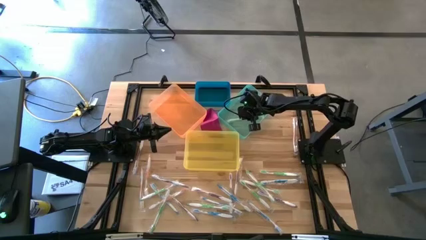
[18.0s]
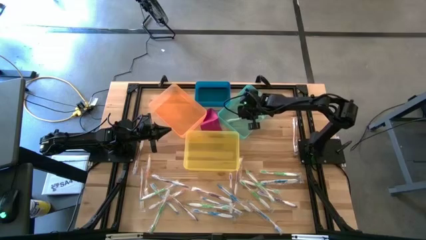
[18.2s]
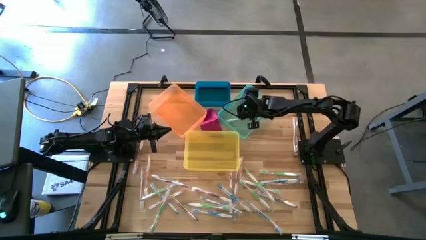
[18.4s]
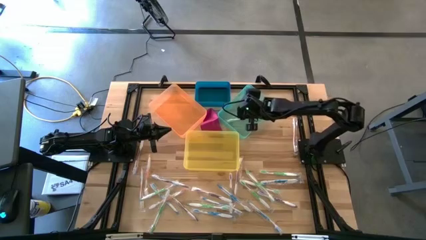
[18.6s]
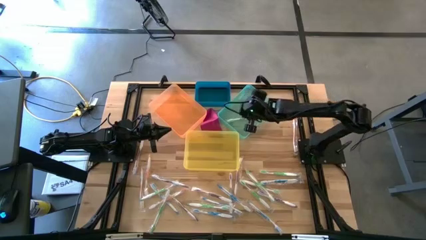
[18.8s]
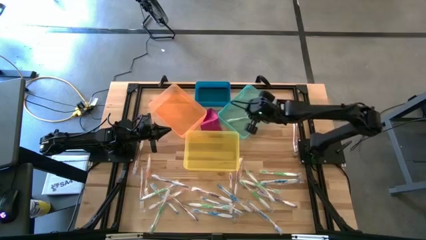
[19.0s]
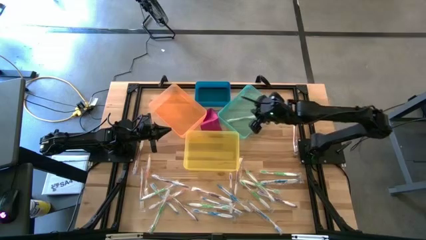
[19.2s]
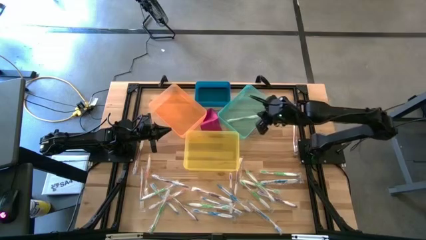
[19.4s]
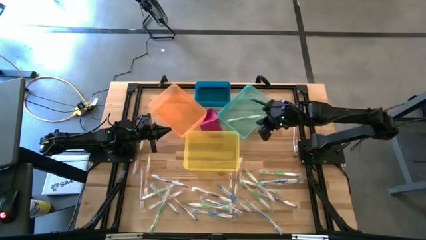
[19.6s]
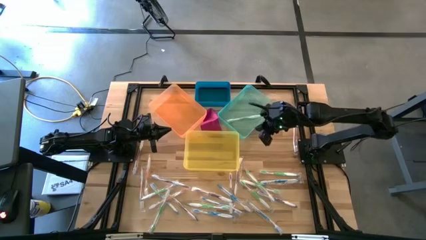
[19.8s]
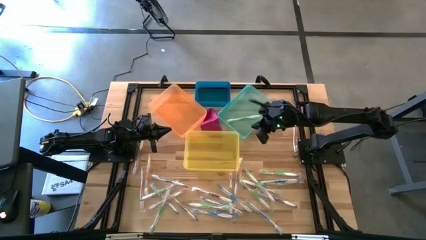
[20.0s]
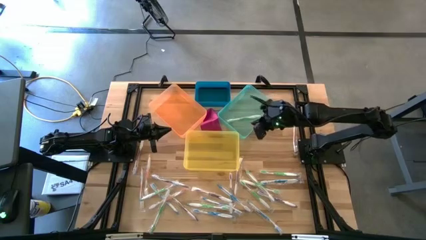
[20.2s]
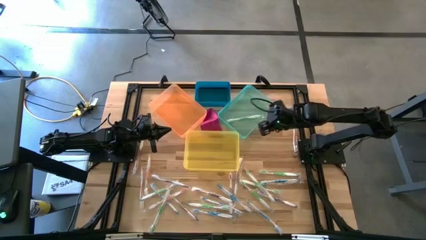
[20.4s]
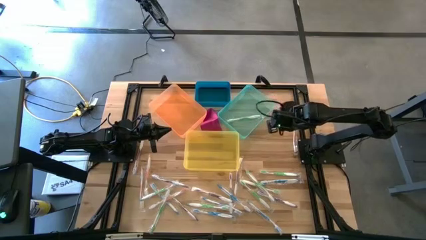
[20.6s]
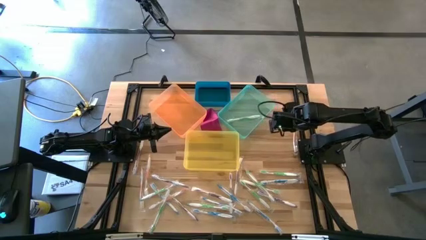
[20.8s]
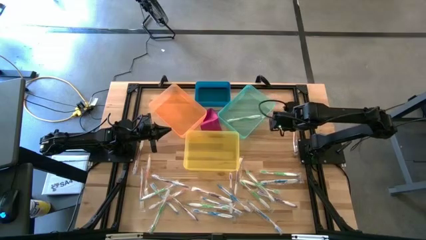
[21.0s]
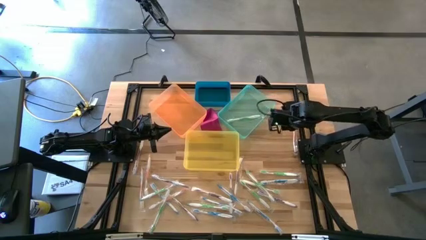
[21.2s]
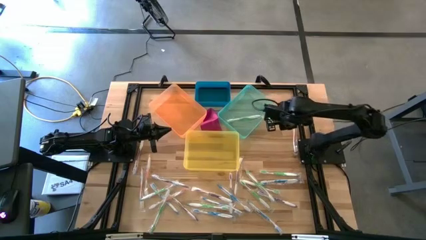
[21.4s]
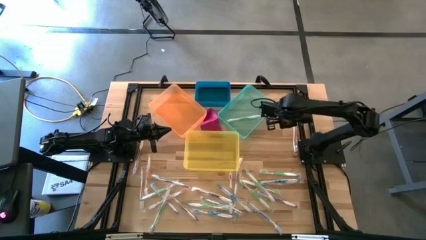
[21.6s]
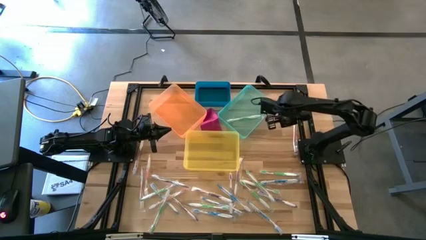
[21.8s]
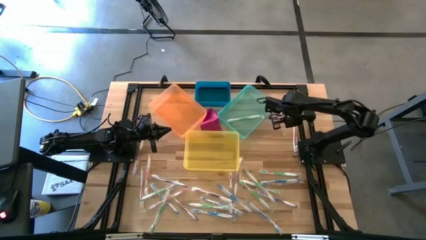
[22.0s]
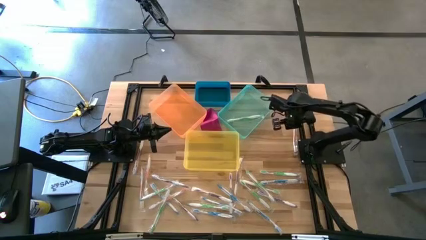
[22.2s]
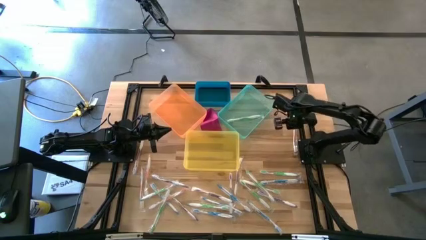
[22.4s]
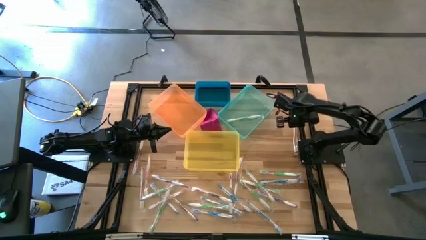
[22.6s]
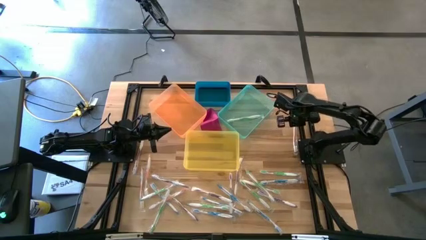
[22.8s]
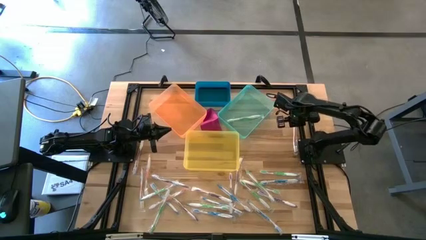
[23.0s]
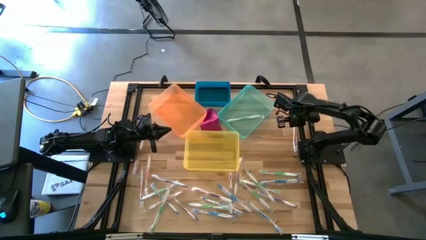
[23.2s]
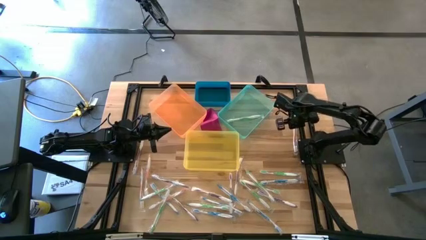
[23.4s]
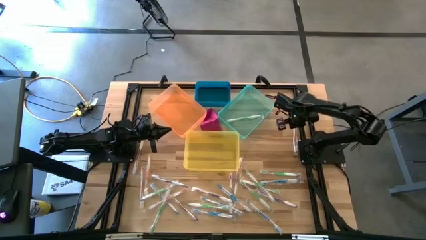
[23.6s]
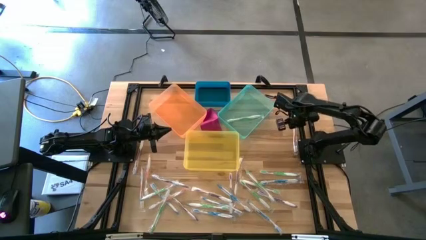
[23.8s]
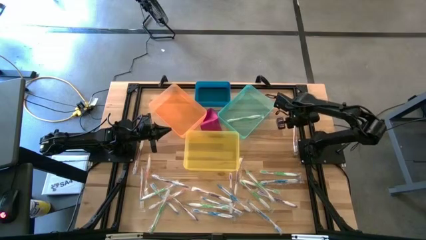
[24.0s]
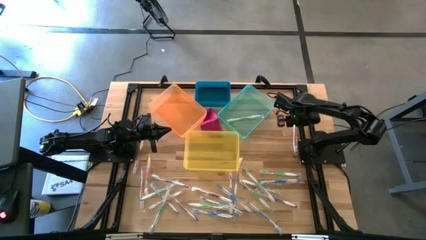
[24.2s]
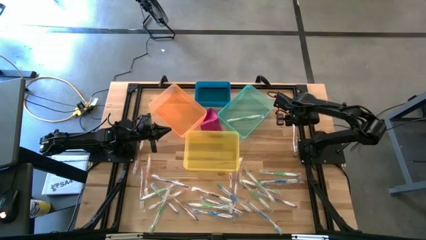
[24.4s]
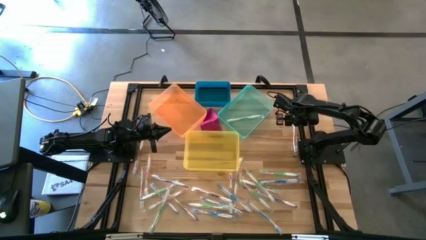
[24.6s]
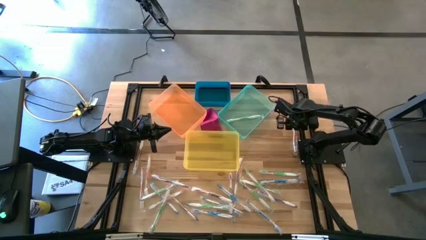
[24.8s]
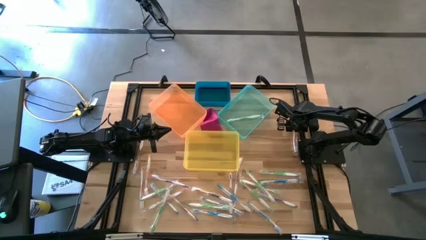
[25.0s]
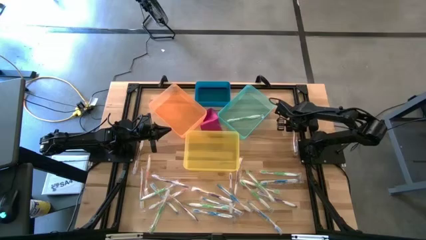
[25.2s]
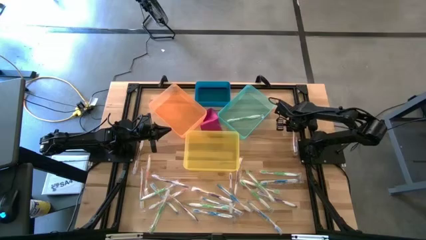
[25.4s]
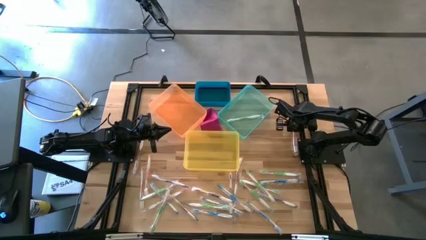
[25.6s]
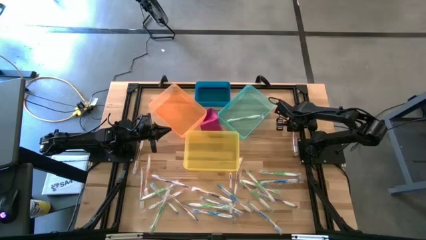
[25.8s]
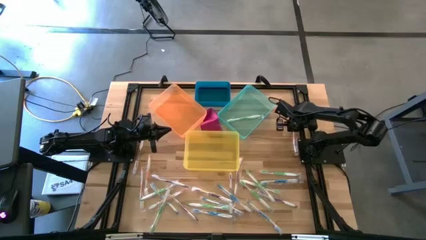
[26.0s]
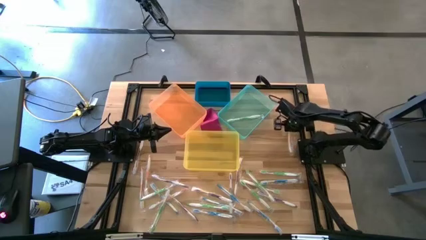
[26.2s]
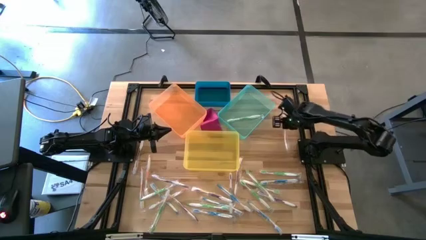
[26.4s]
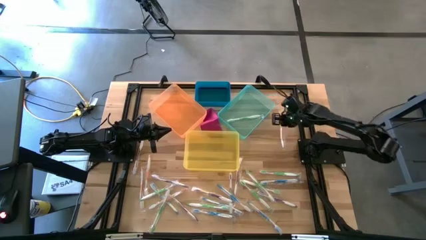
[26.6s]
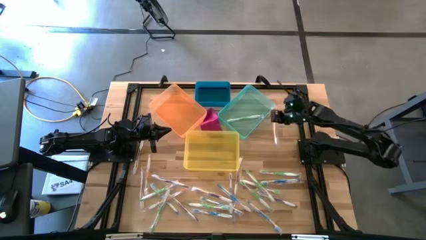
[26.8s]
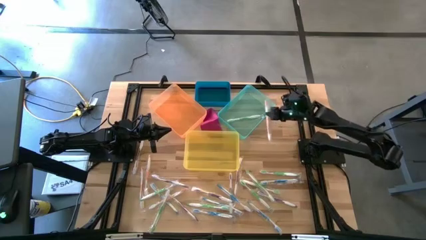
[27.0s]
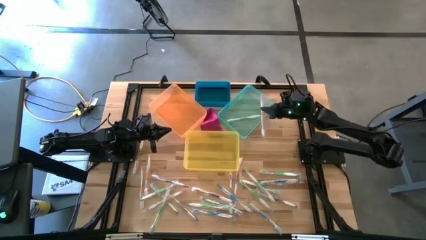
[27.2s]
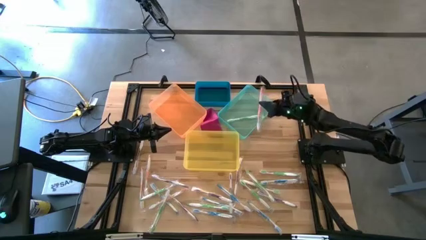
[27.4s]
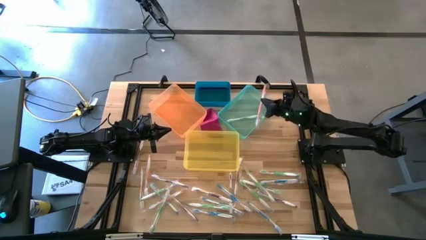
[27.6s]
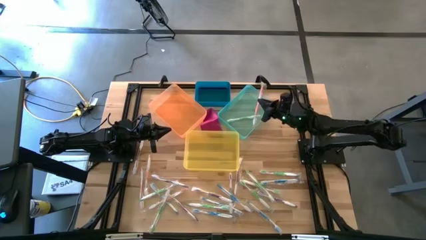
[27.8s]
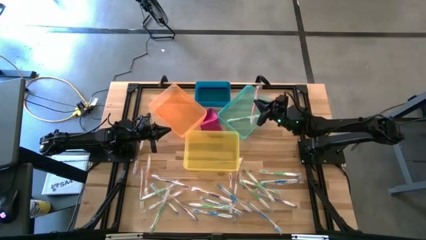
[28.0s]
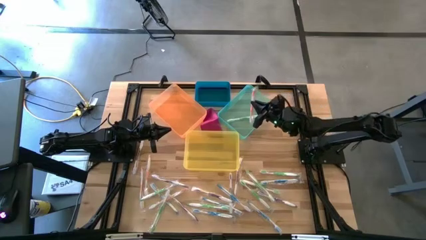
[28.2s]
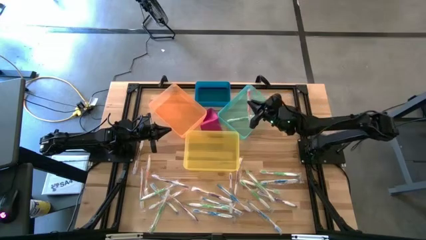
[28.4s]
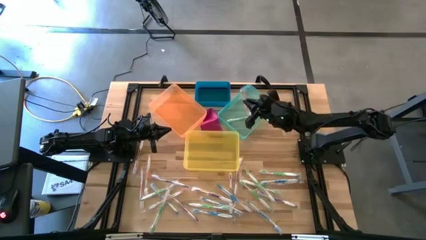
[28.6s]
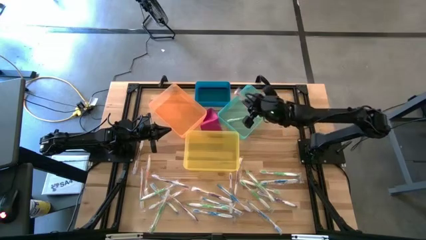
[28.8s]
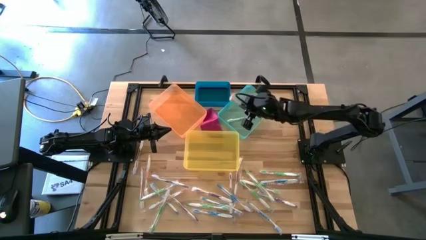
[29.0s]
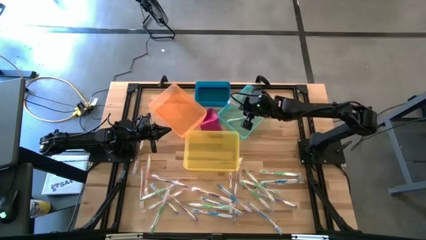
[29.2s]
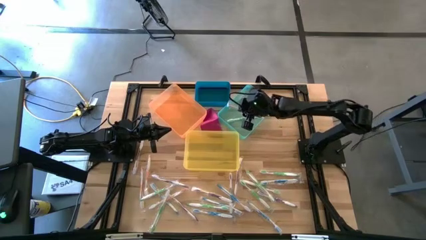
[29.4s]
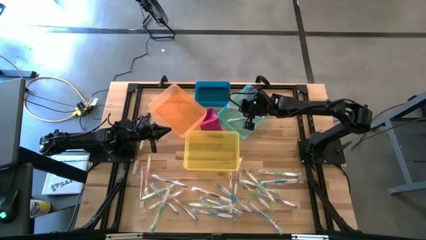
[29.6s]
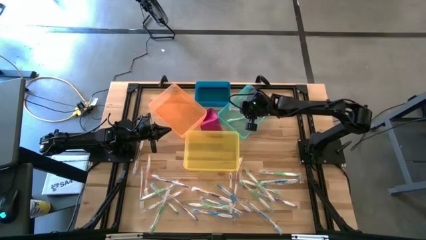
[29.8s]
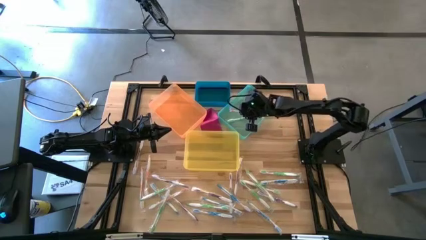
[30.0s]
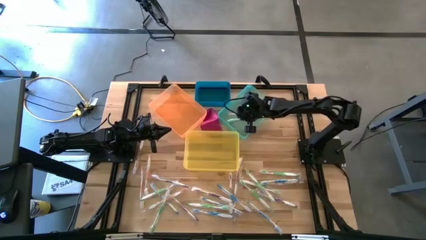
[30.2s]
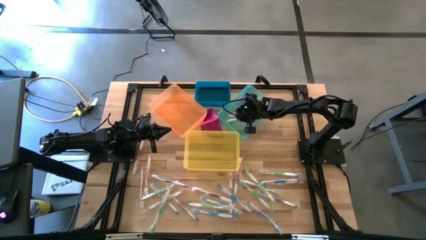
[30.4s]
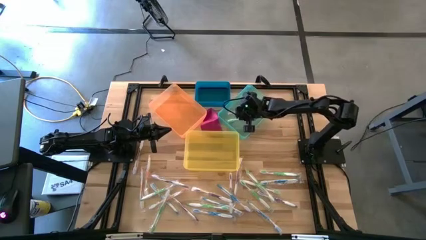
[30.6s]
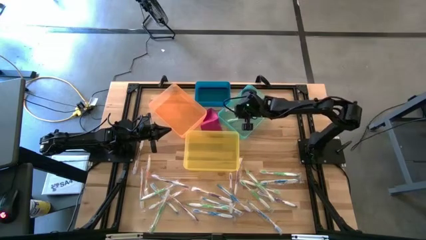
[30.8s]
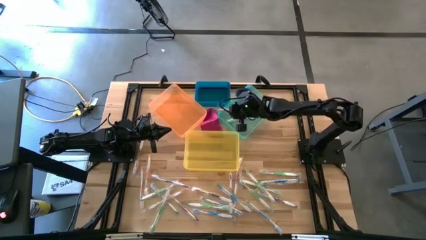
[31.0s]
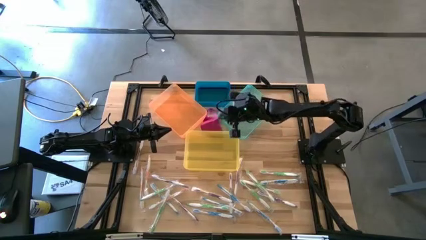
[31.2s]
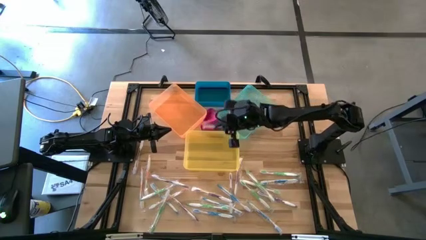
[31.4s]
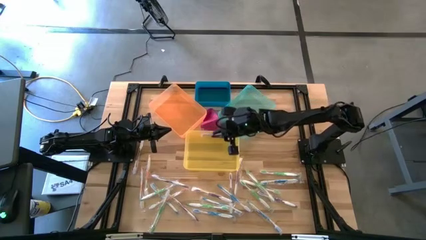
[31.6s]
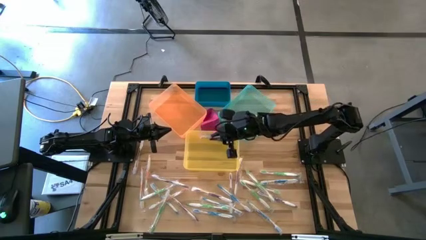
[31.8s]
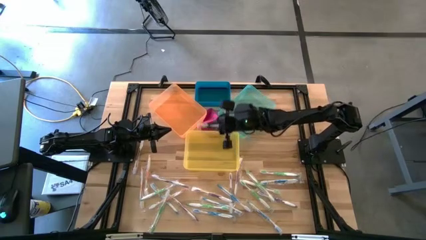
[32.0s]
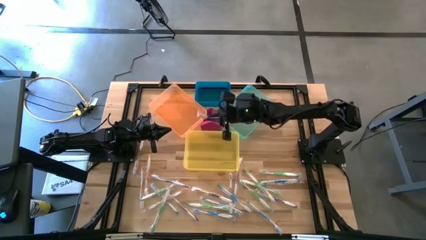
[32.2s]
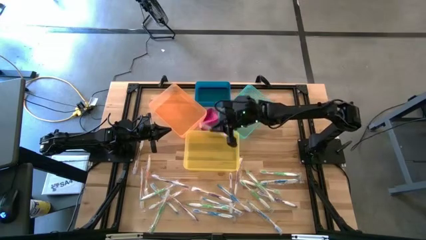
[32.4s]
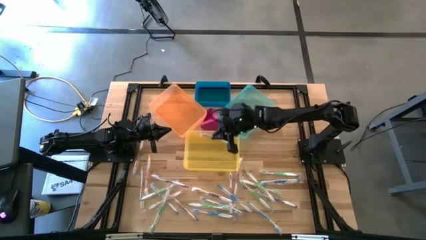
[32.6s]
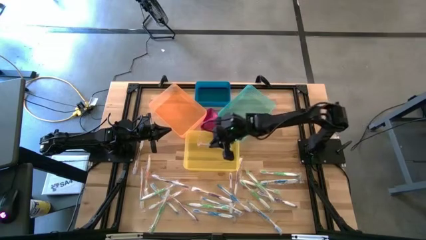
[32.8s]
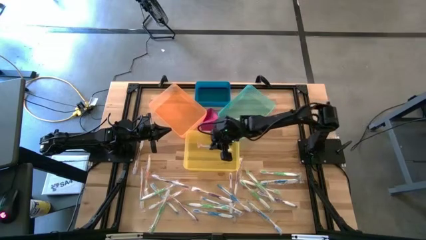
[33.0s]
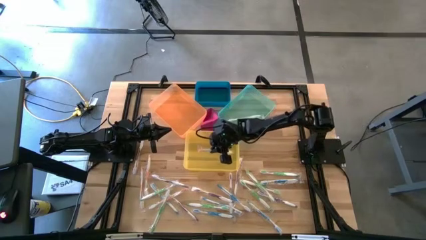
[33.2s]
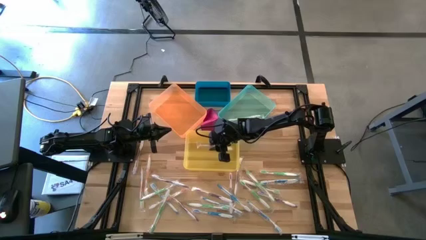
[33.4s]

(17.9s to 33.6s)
Task: Pick & Place Toothbrushes
Put the orange toothbrush into the yellow bin
